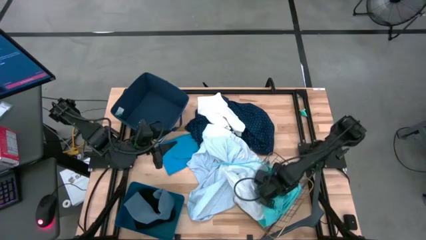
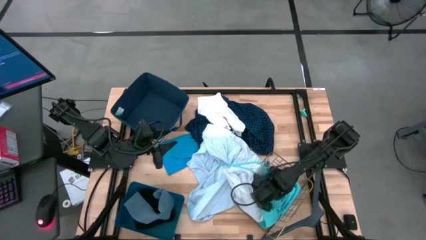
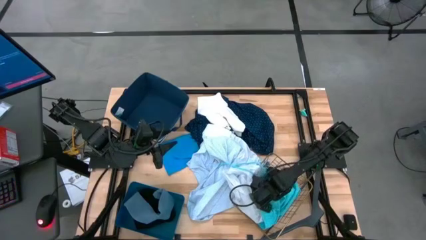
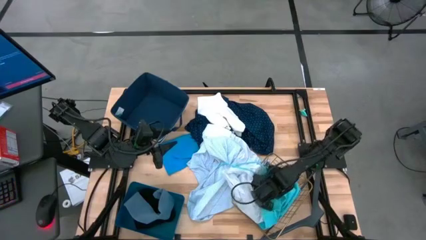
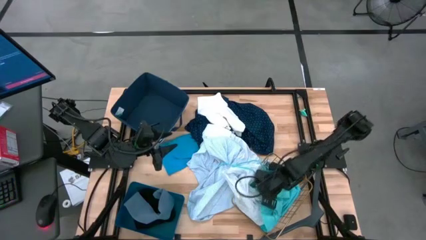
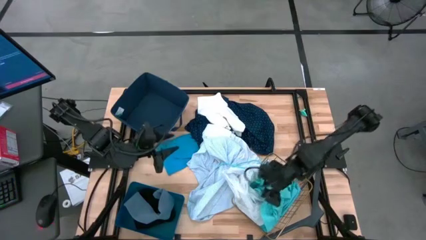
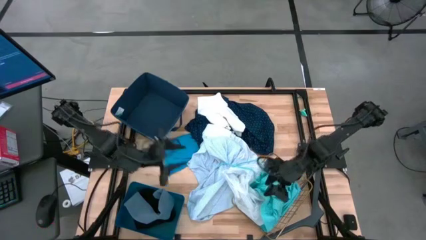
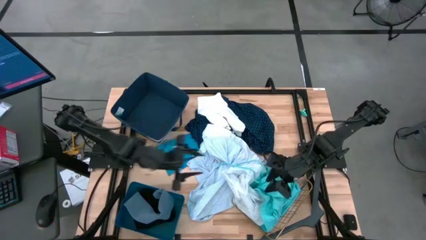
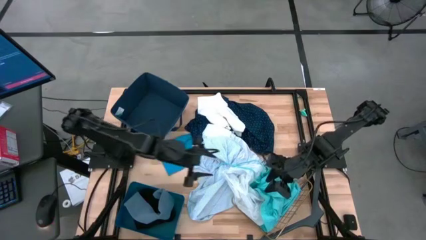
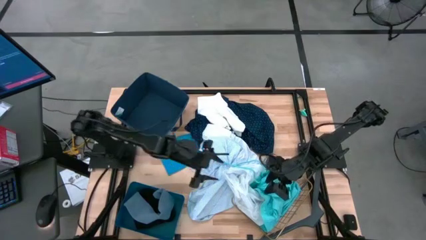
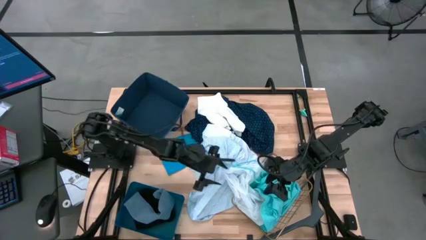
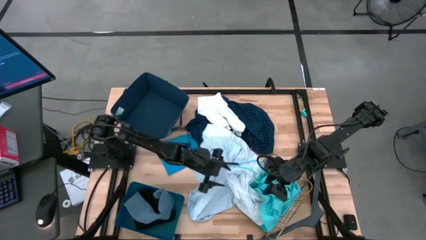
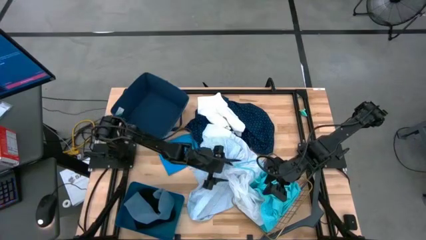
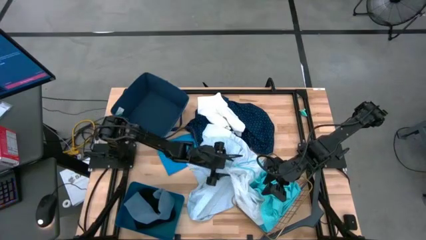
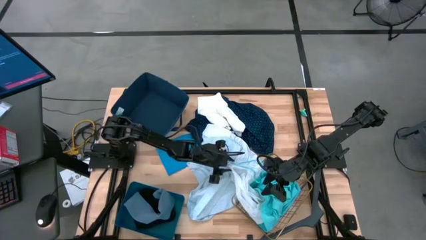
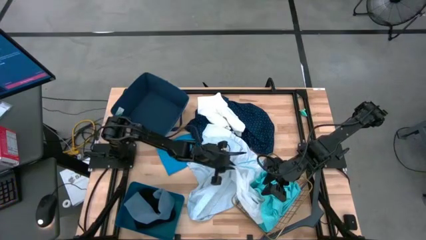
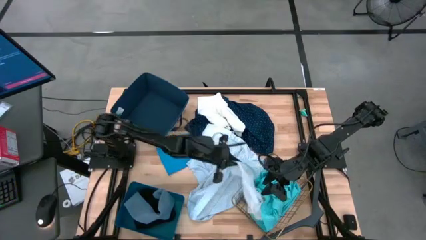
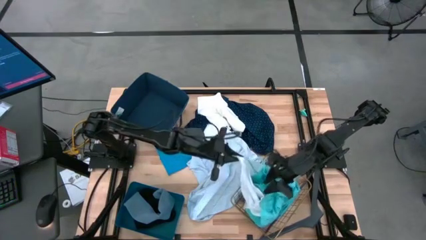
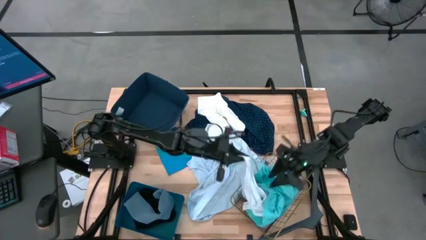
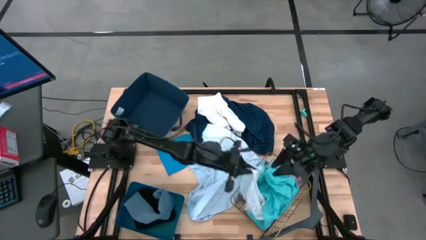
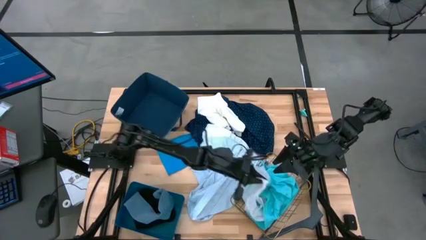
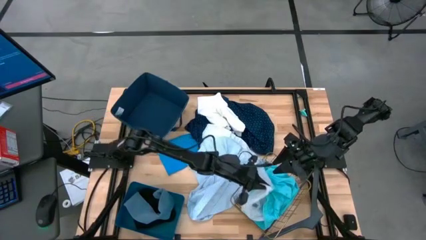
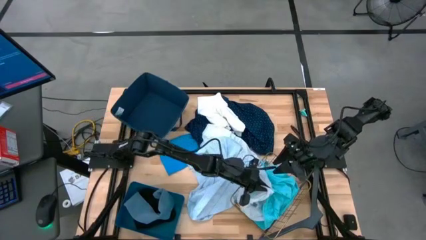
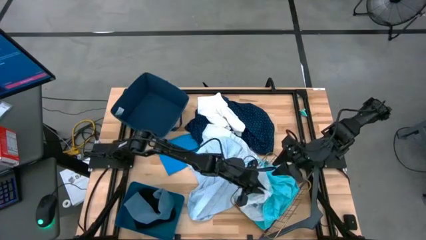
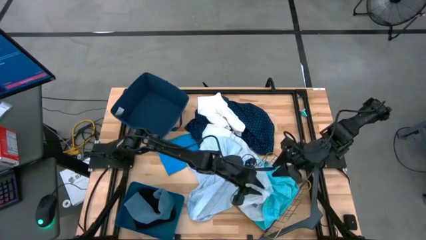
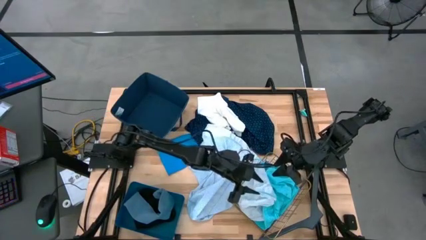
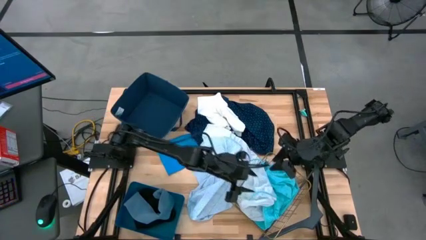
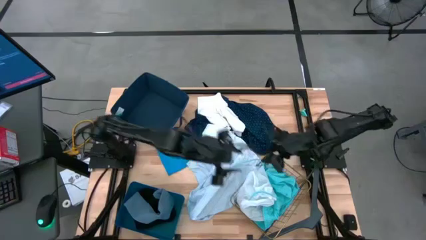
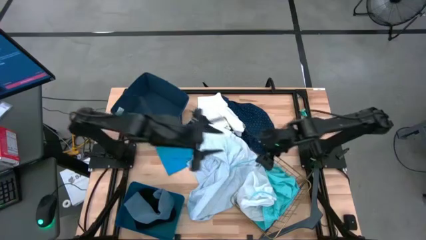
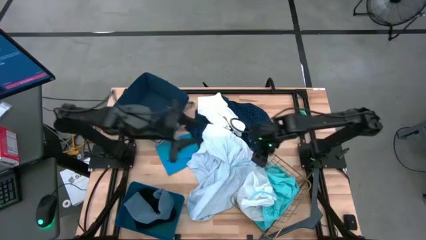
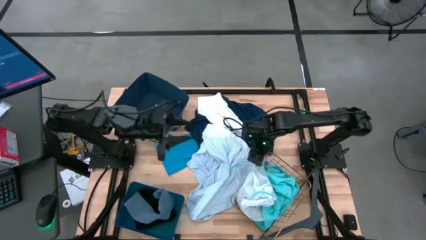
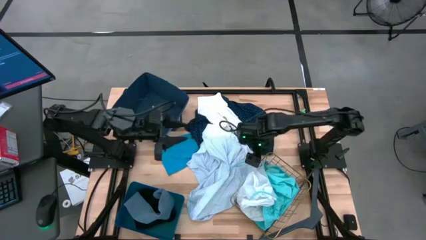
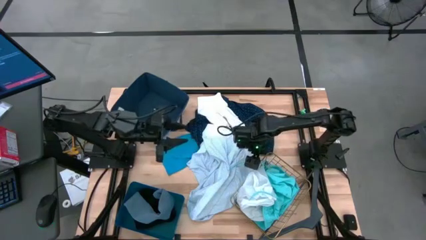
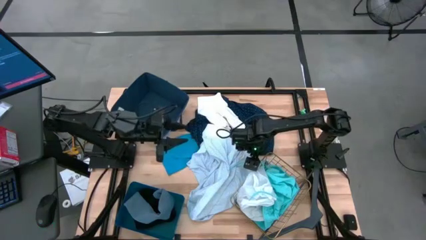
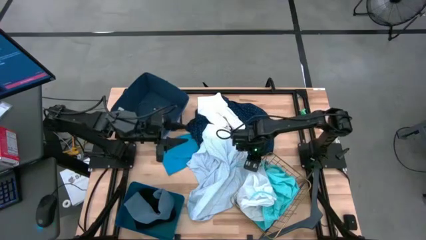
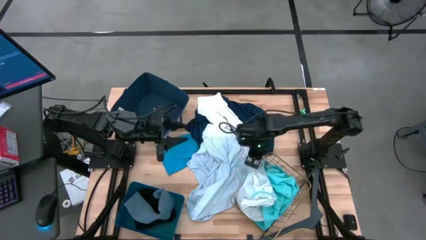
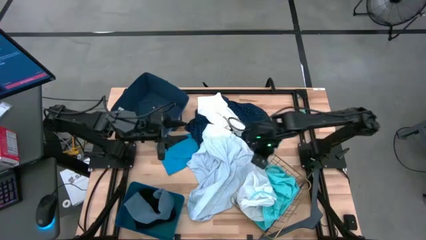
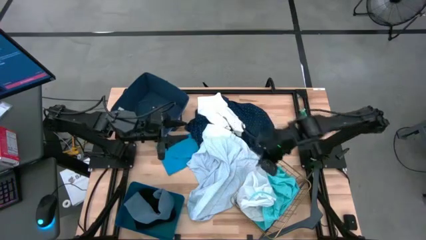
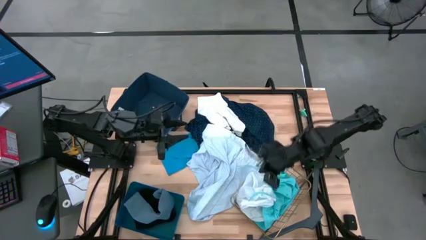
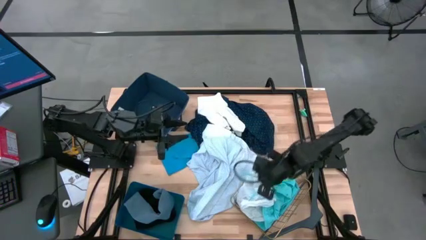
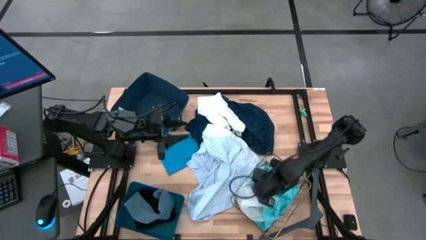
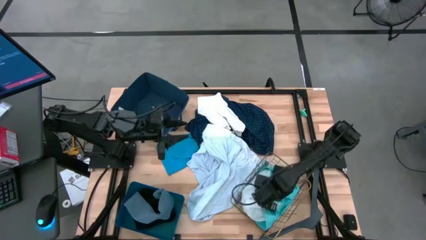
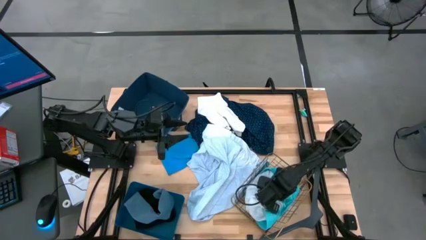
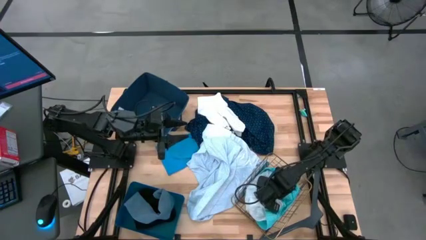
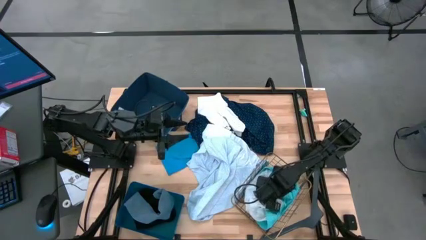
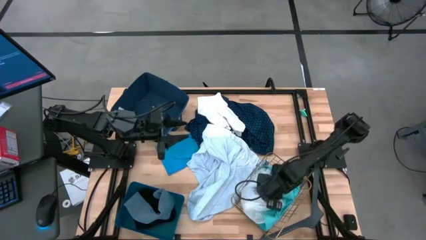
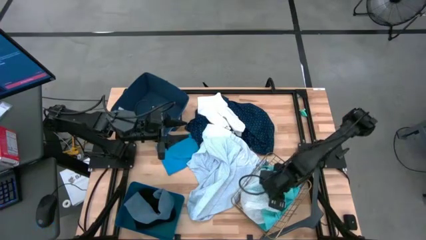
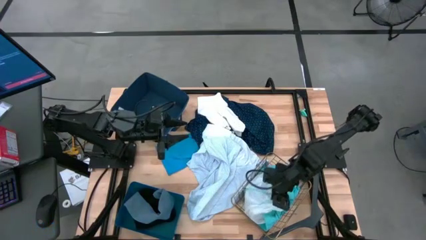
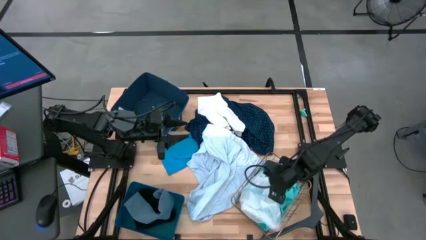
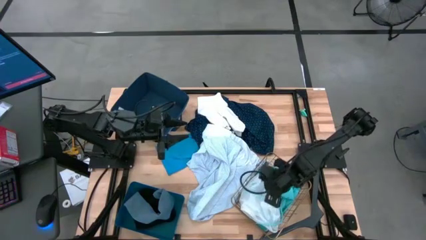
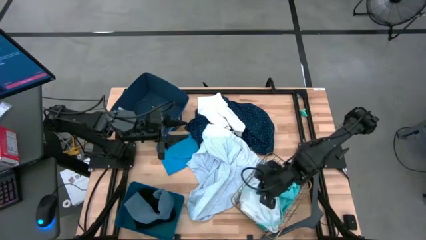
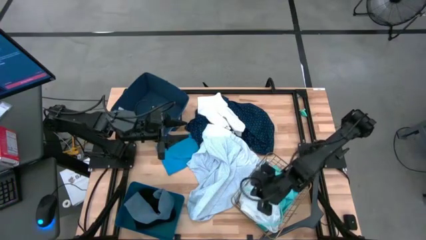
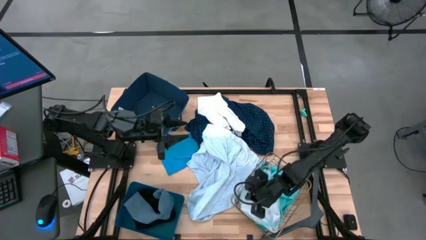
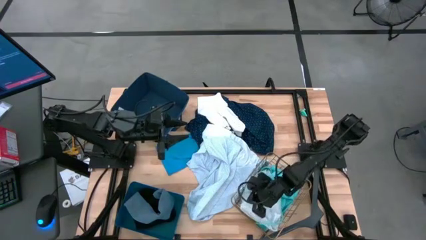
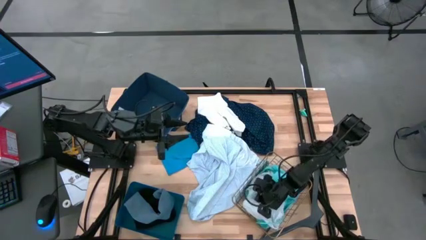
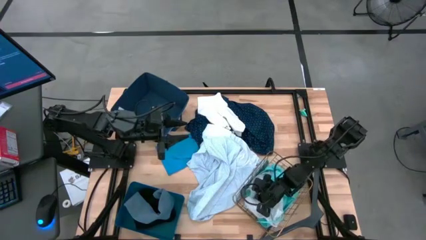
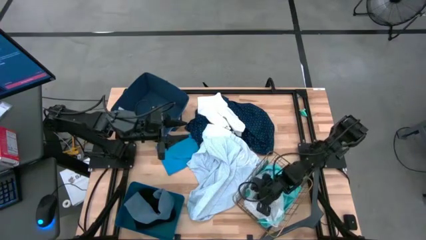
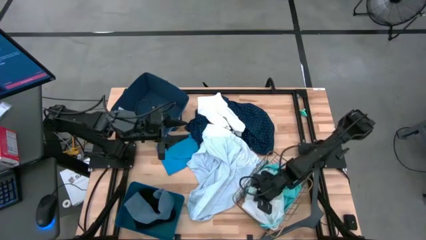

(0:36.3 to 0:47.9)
Task: Pick & Place Cloths
Put the light blue shorts into the gold basket
